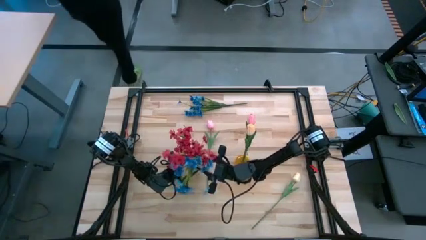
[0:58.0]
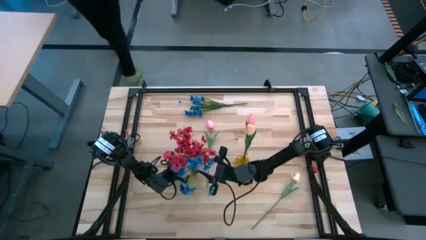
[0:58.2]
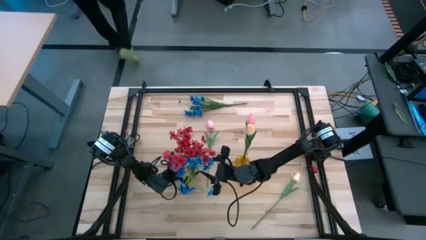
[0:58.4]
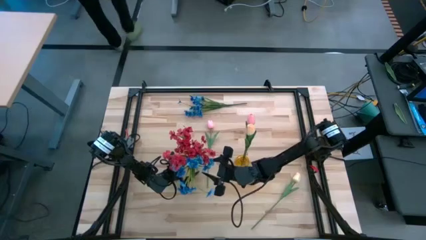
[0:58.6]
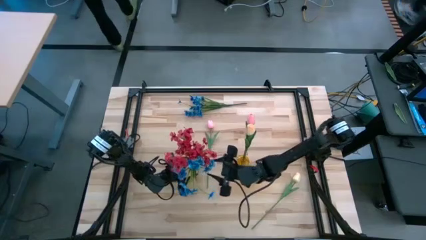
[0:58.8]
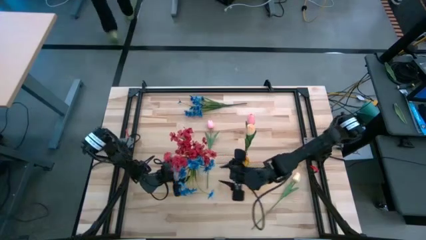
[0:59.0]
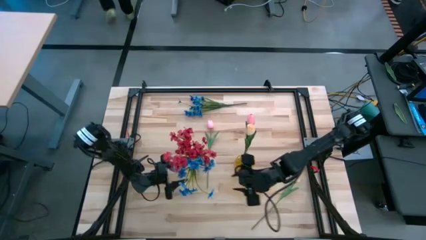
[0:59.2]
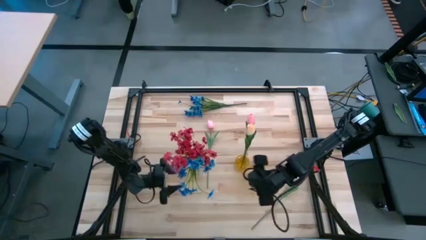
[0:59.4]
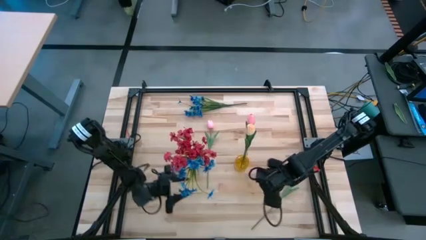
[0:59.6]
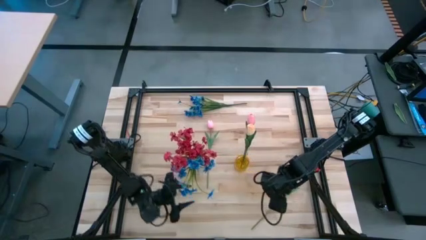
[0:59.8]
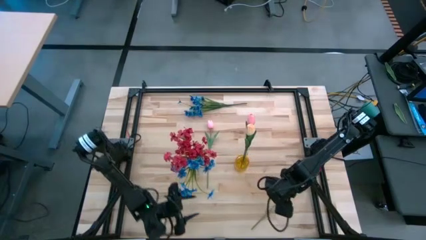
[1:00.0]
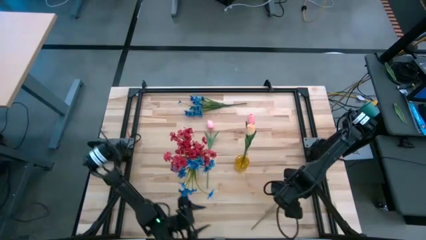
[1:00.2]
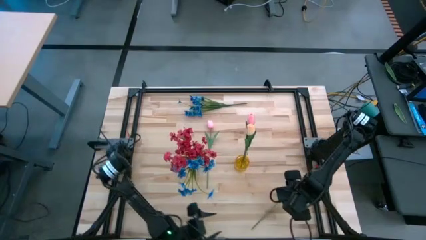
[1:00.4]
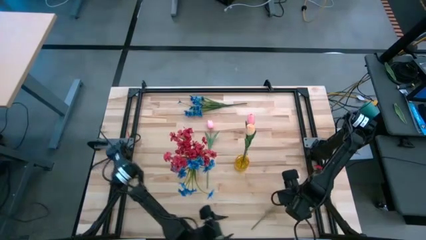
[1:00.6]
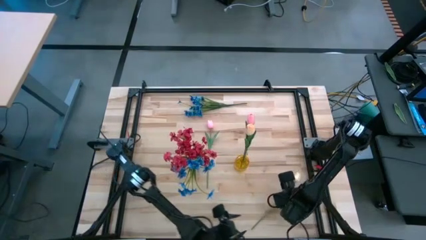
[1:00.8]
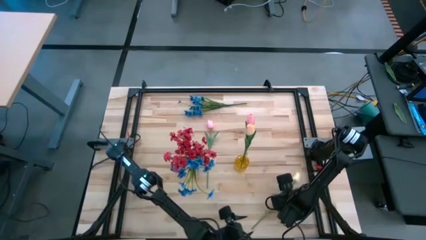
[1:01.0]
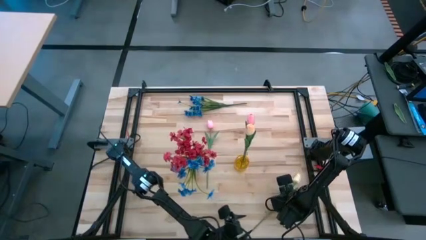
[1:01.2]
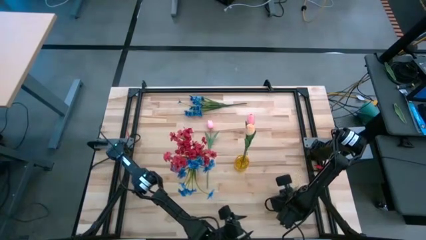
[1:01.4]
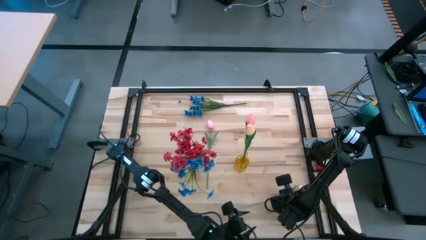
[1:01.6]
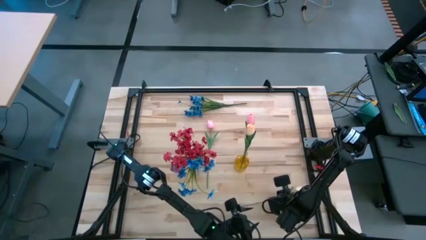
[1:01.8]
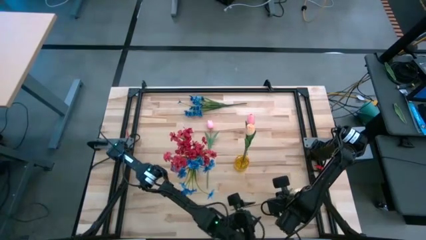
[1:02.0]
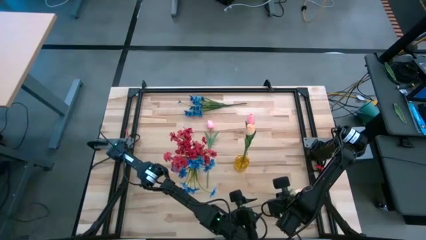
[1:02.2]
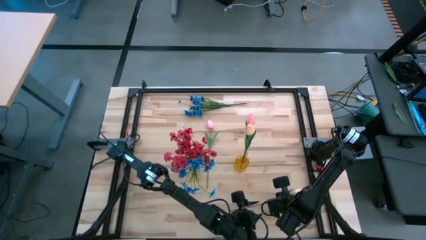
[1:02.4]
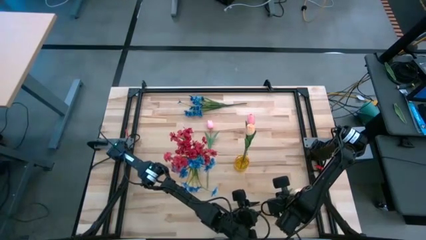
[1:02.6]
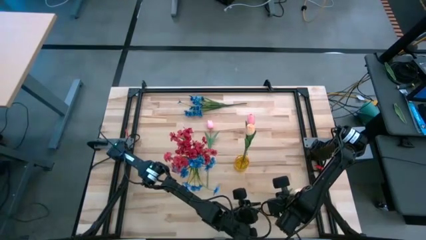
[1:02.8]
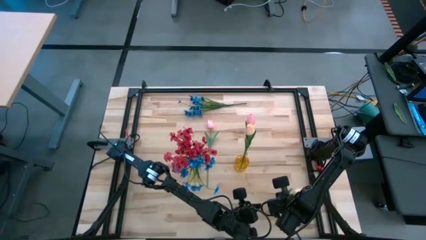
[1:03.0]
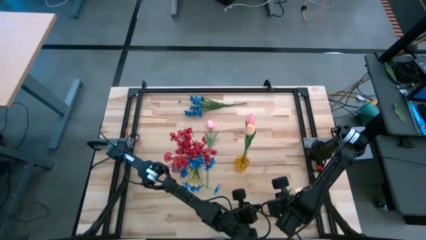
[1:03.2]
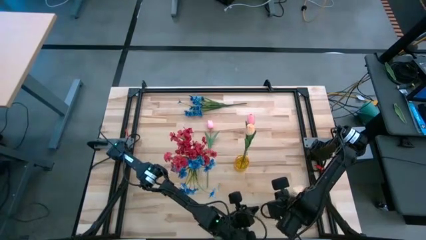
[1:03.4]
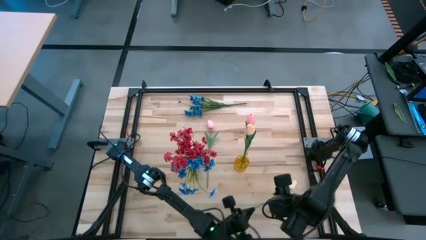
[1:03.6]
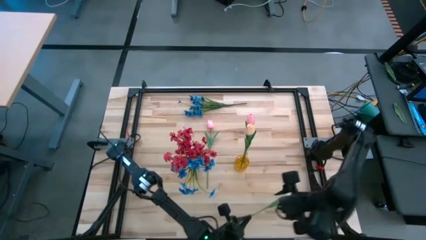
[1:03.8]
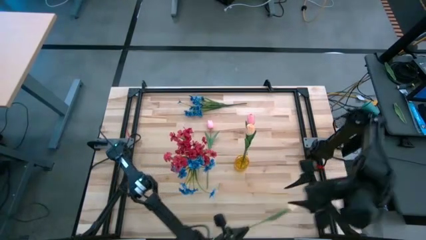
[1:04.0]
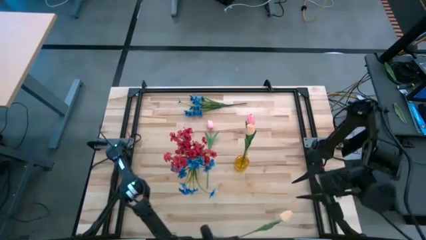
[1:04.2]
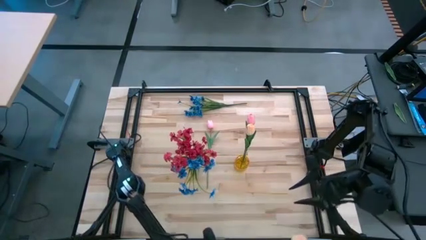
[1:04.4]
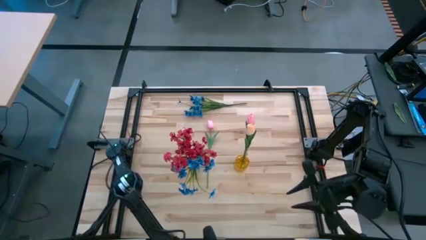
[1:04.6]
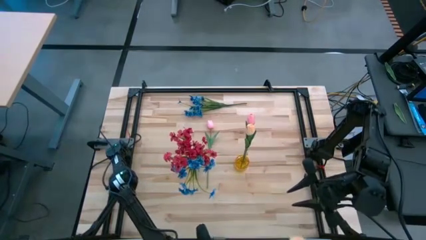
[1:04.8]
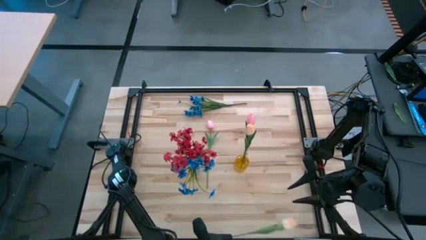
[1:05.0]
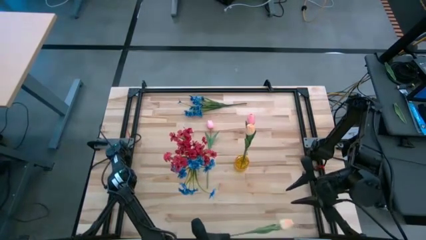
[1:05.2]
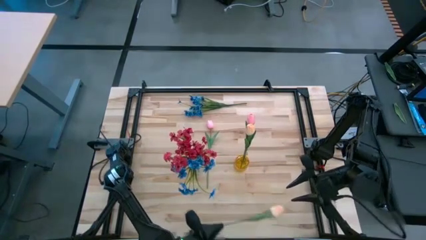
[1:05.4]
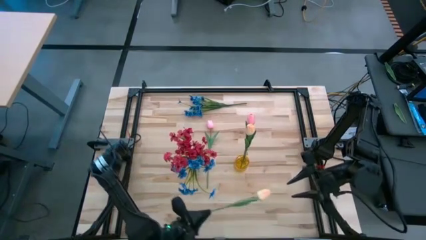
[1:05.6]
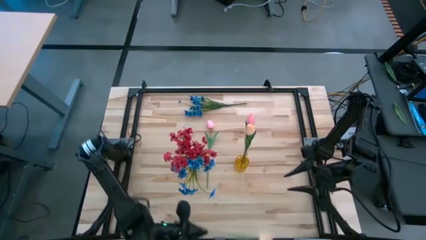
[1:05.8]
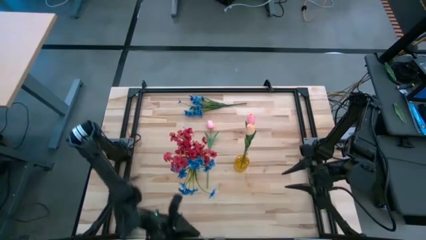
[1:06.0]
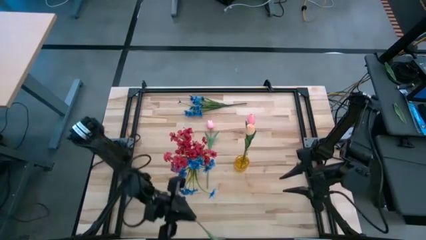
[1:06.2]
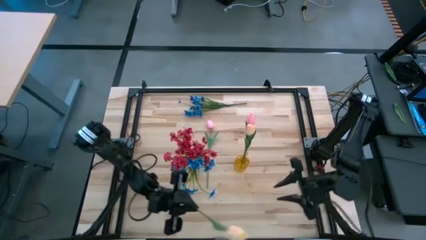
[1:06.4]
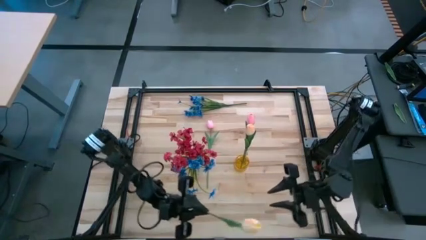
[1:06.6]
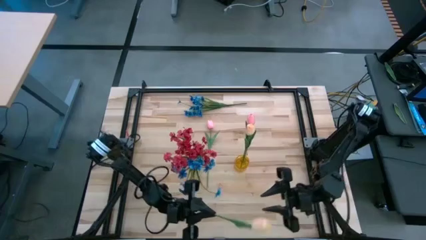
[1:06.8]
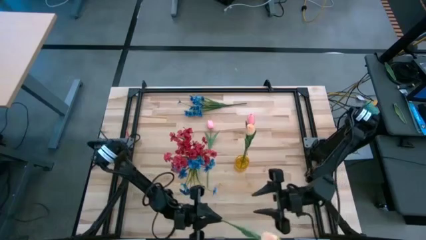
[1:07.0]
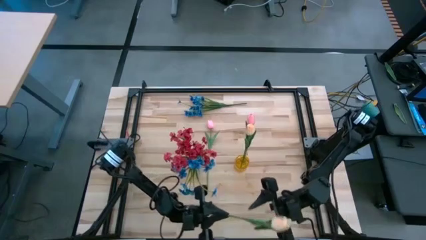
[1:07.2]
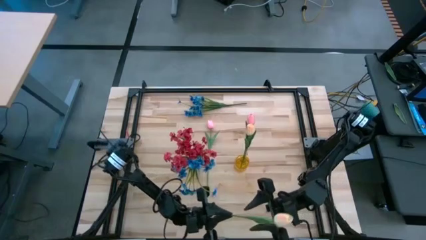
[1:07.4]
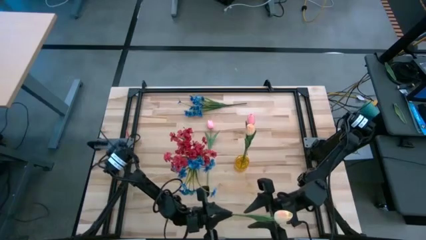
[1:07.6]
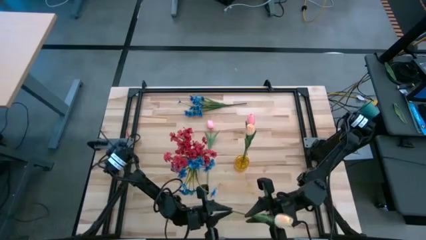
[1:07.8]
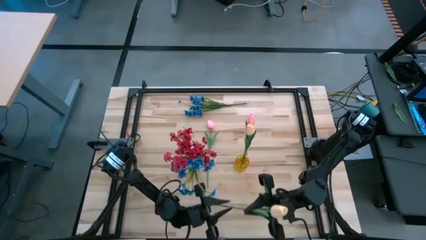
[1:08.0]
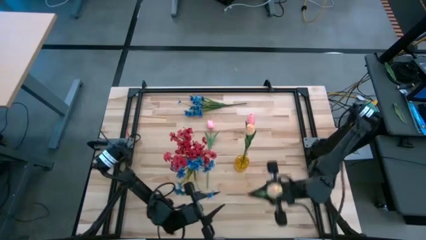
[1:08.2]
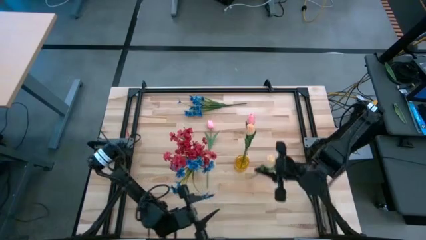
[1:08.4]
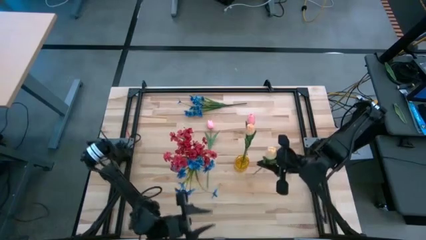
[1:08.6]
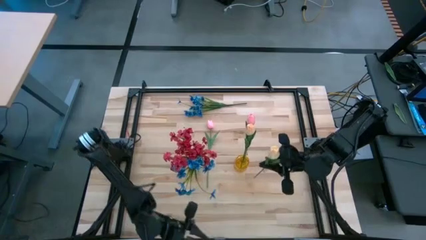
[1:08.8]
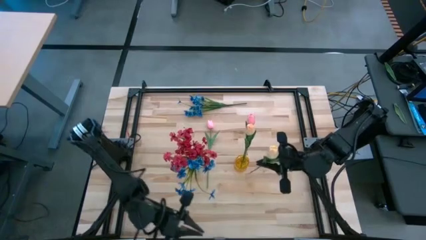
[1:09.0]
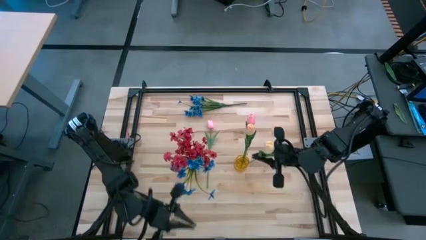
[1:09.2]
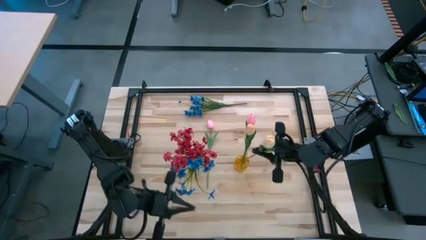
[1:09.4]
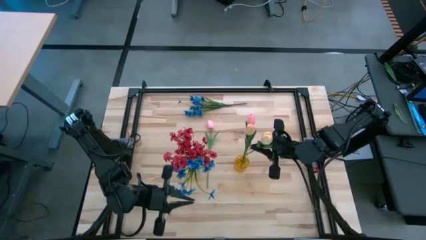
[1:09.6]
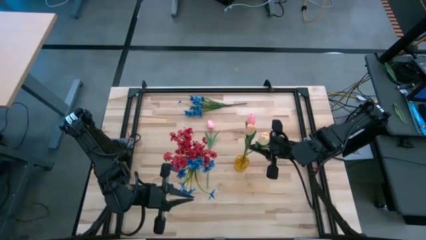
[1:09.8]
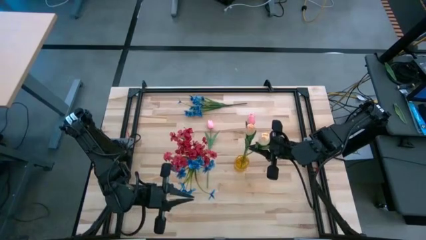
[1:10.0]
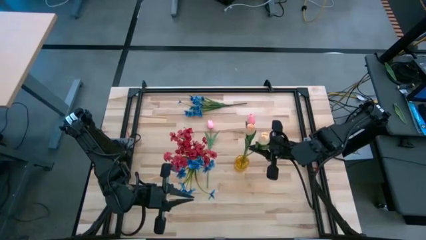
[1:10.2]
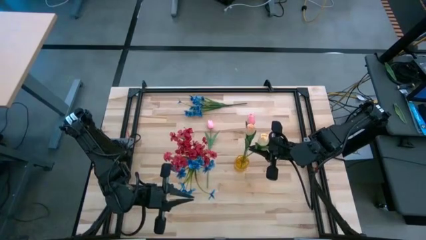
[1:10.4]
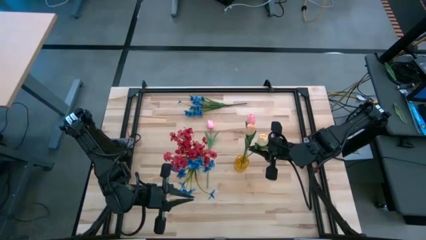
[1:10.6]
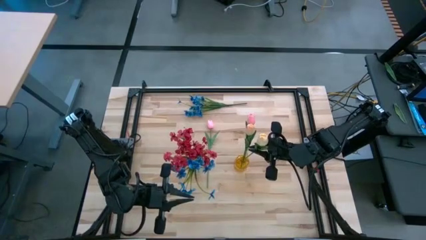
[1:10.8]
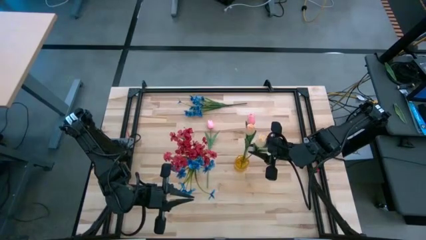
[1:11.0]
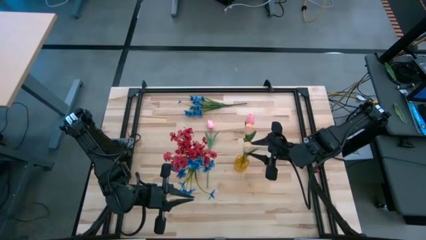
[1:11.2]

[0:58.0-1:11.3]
Task: Sort flowers into vase by color
Put the pink and white flower into the yellow vase

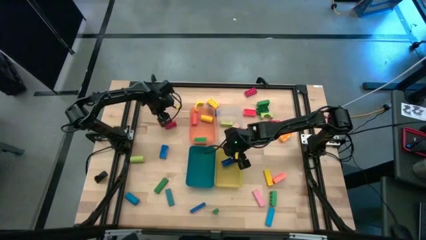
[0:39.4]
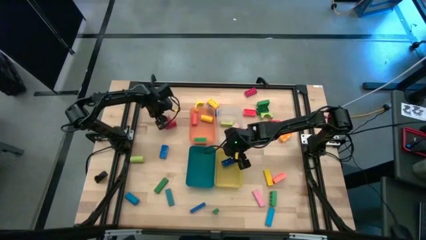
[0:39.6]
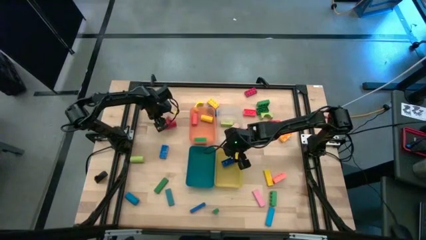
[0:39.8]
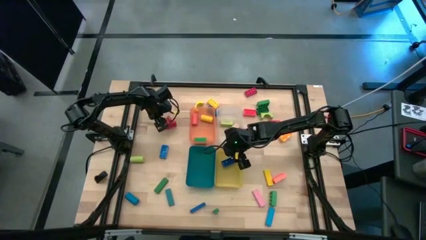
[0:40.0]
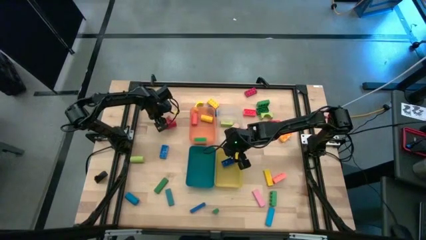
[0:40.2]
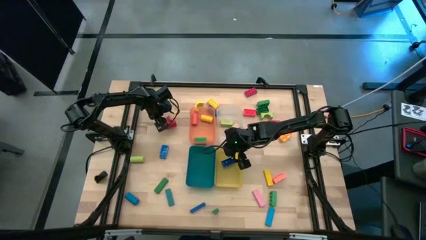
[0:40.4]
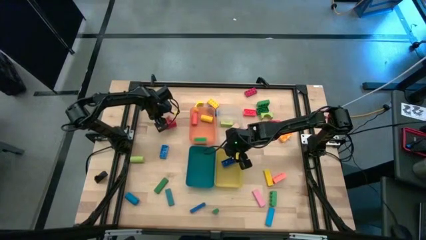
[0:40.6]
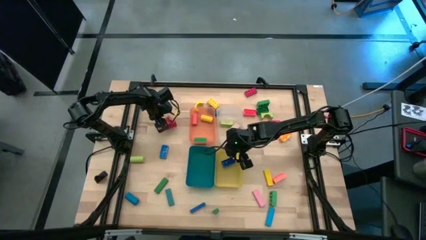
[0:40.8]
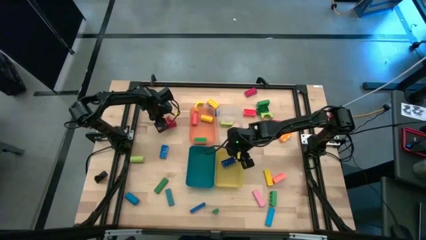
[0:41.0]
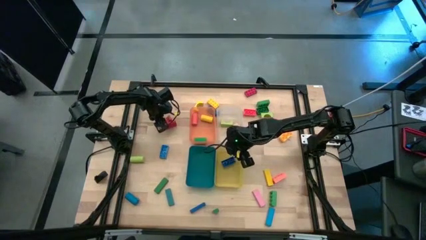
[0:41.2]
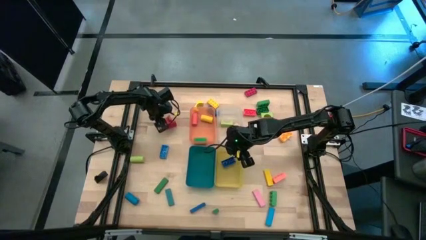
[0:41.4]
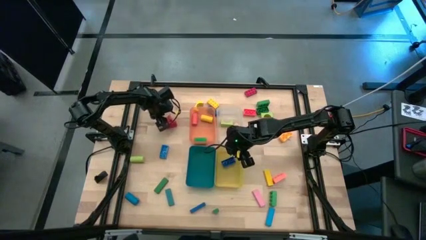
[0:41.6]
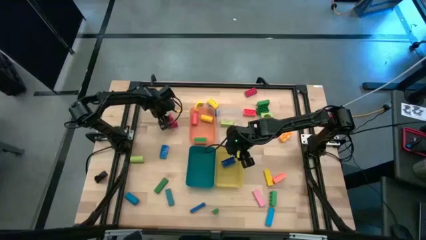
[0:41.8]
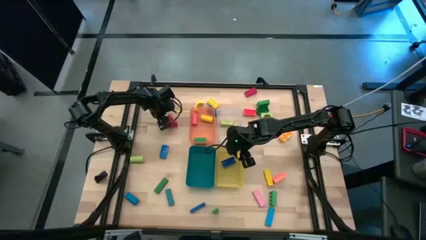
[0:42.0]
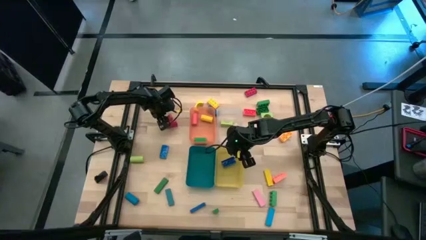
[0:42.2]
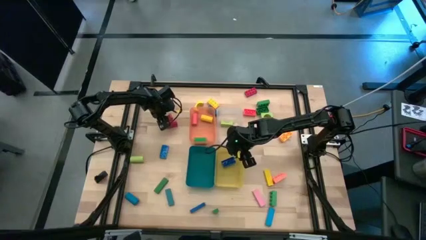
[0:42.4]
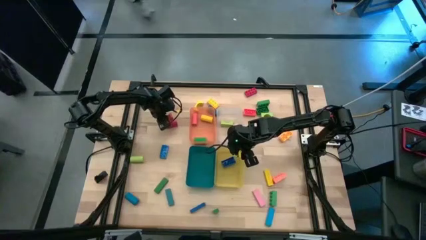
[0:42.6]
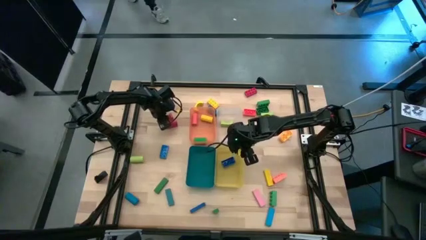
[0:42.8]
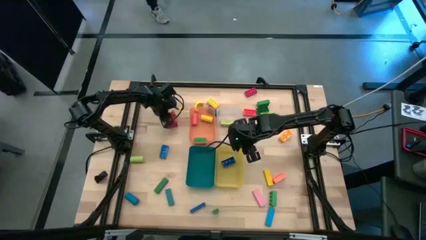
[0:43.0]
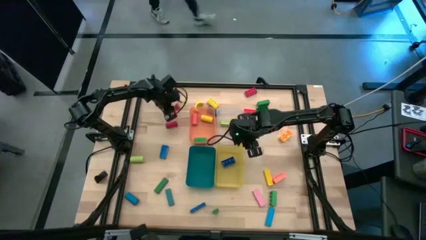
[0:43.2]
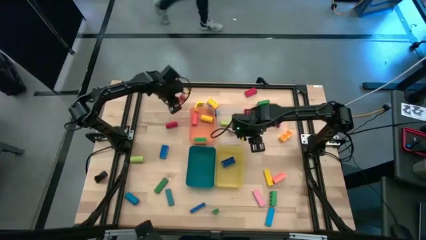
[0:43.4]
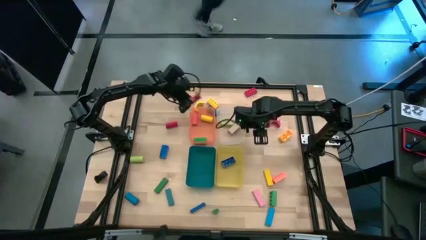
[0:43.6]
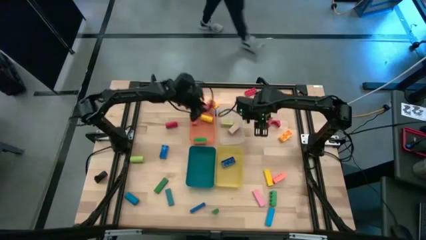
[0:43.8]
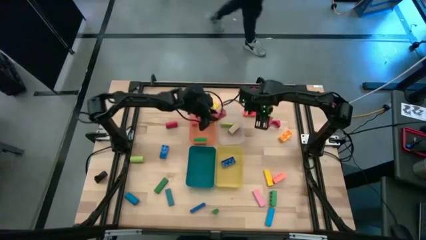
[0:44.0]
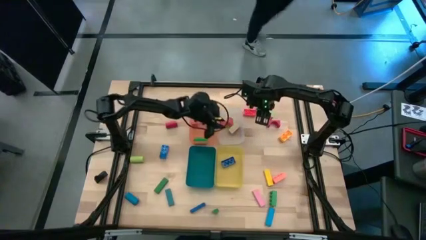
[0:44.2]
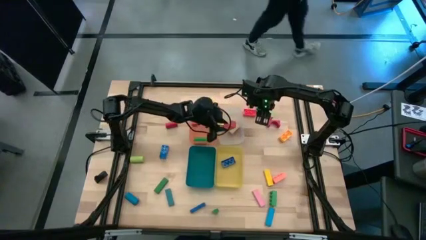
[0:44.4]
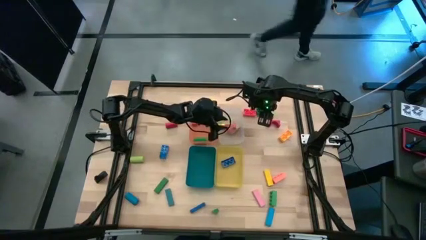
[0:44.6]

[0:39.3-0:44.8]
Task: Sort blocks by size
Put the orange arch block into the transparent bin
